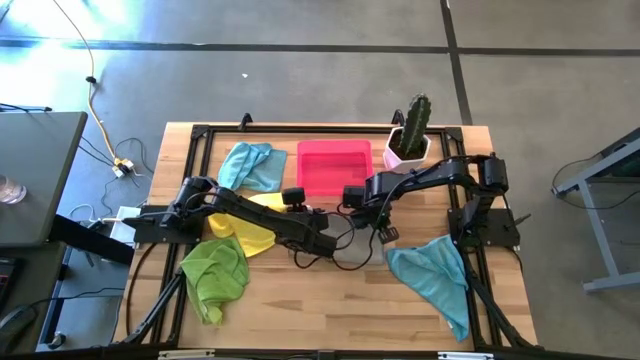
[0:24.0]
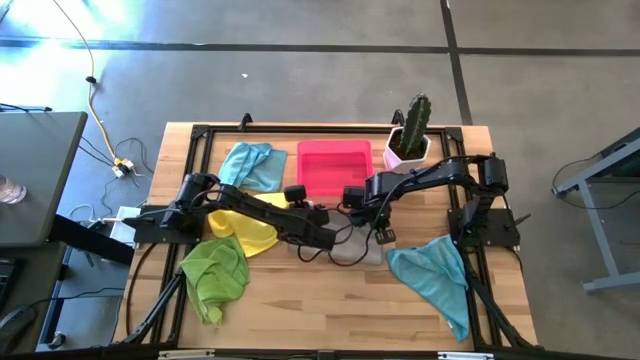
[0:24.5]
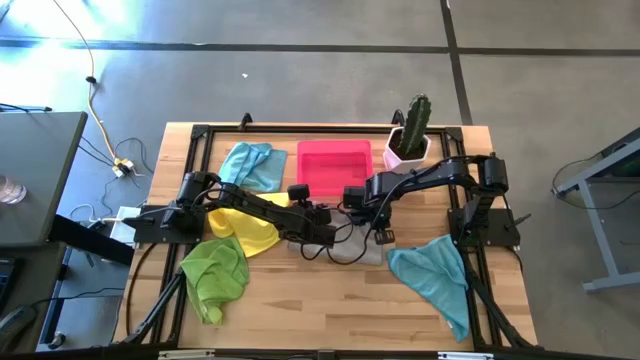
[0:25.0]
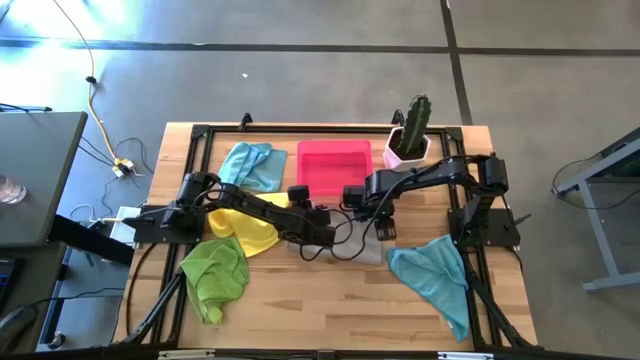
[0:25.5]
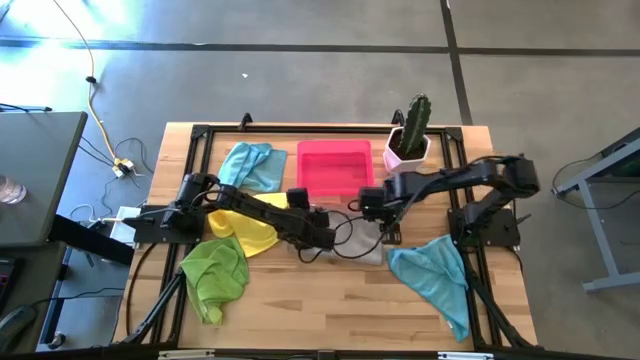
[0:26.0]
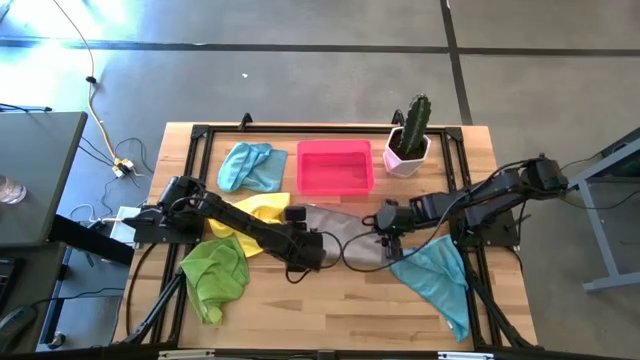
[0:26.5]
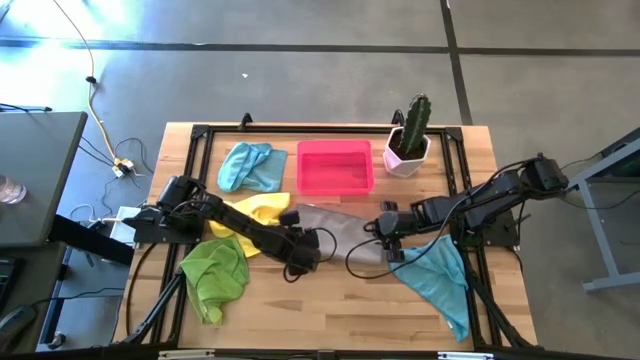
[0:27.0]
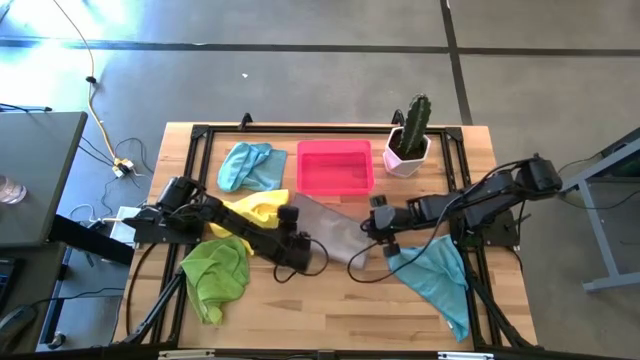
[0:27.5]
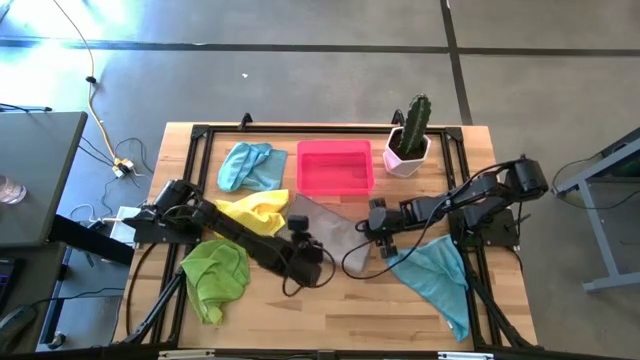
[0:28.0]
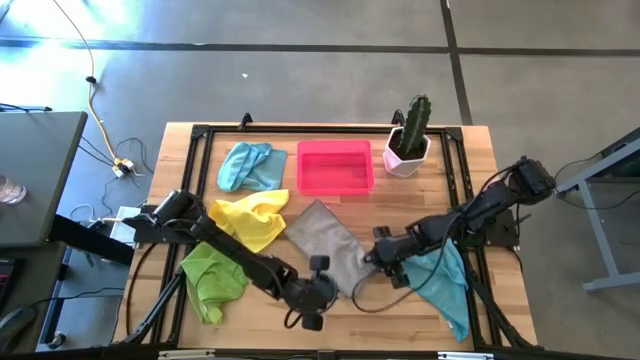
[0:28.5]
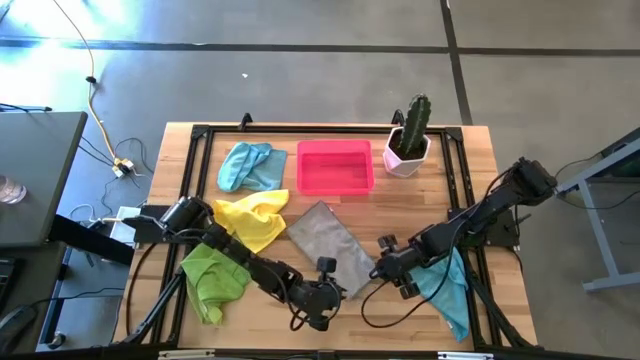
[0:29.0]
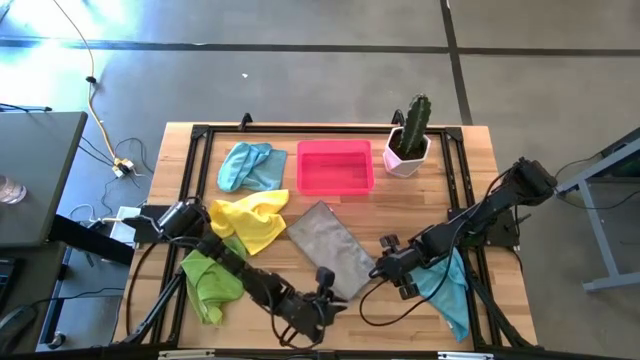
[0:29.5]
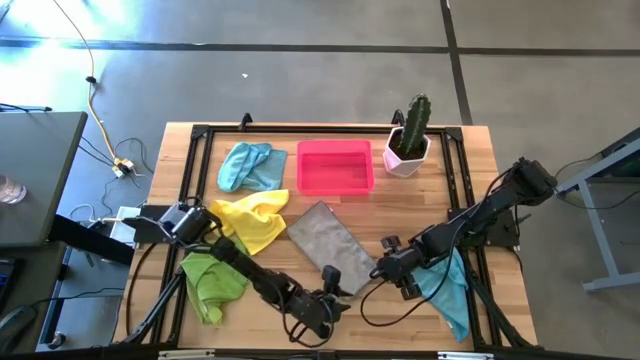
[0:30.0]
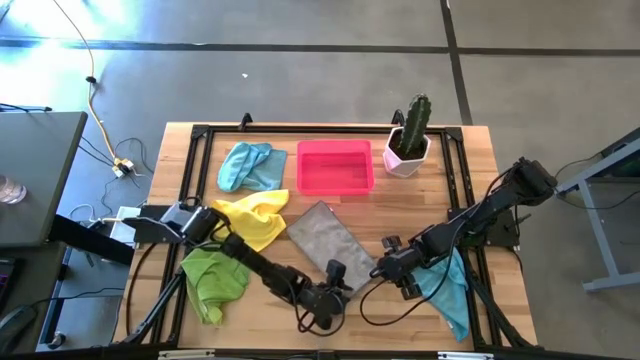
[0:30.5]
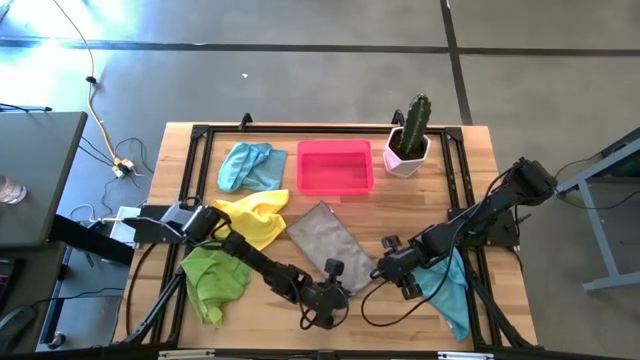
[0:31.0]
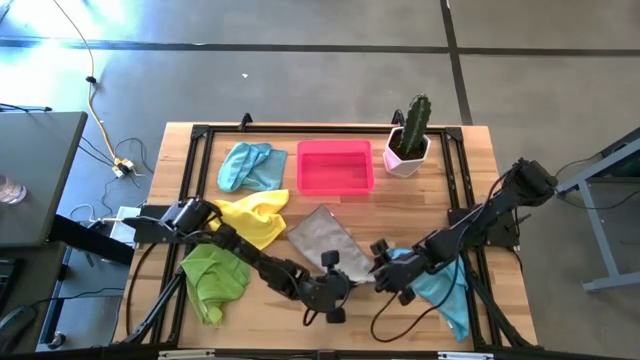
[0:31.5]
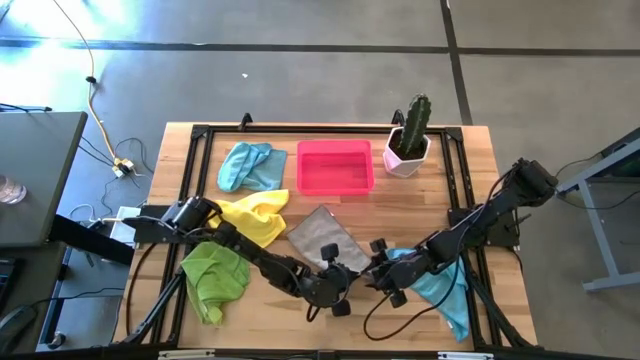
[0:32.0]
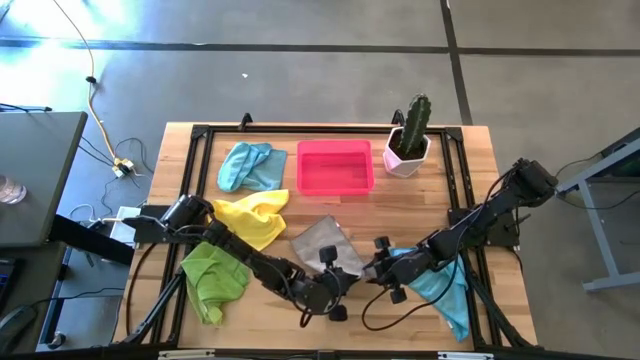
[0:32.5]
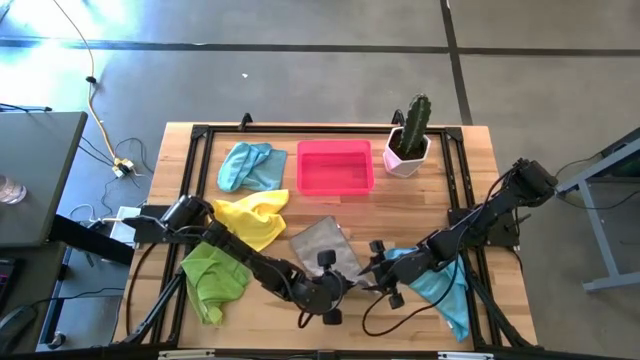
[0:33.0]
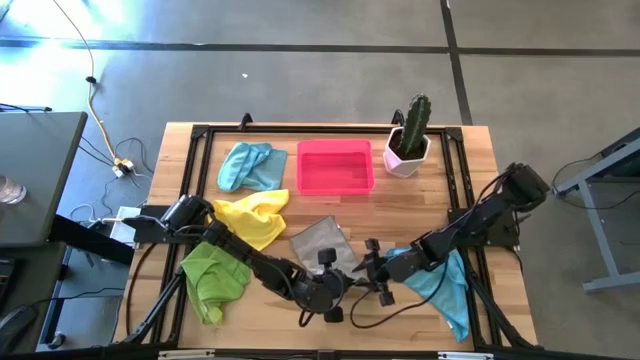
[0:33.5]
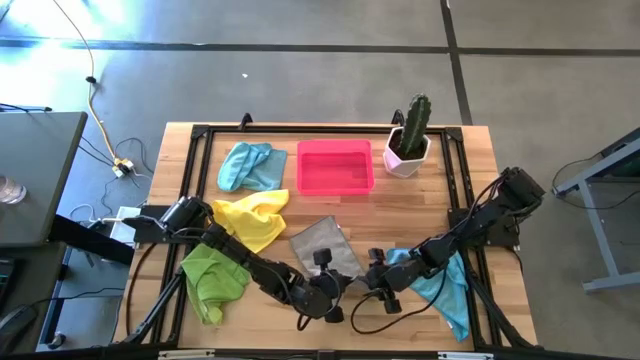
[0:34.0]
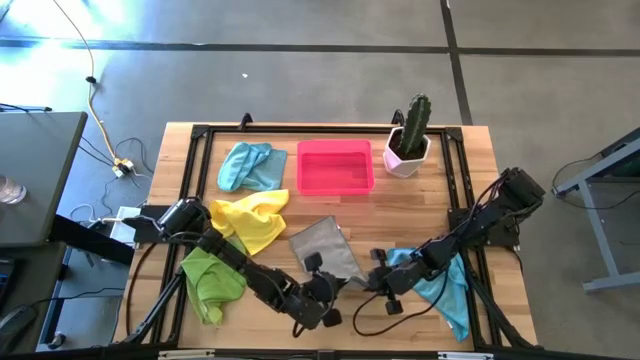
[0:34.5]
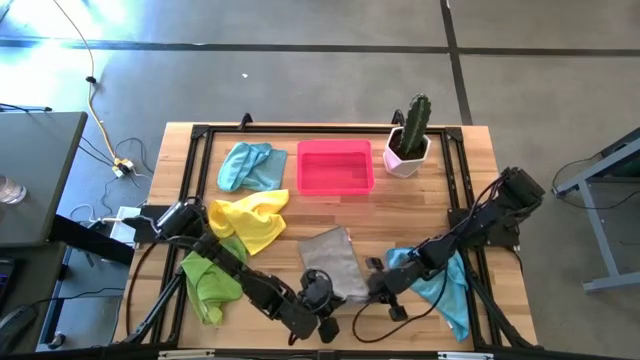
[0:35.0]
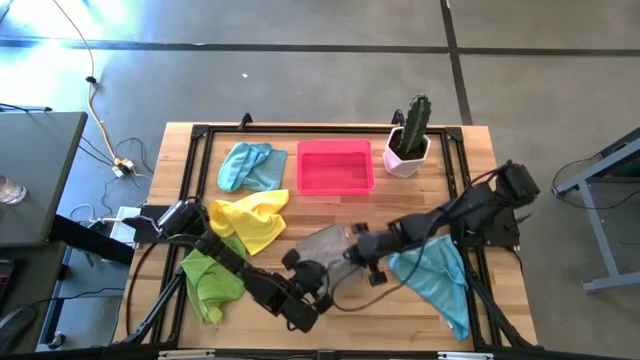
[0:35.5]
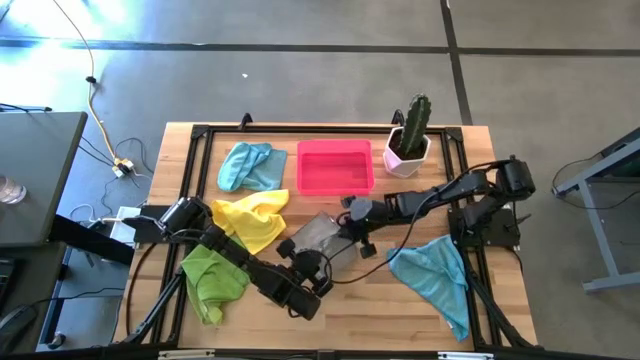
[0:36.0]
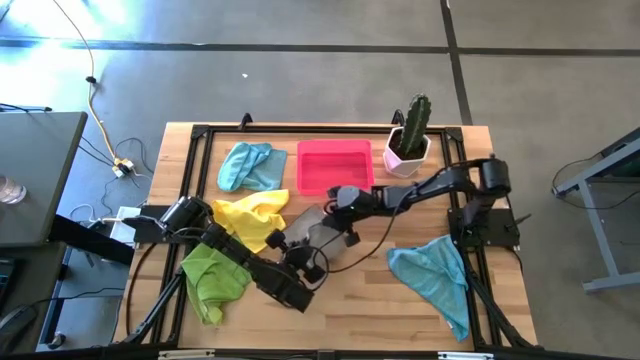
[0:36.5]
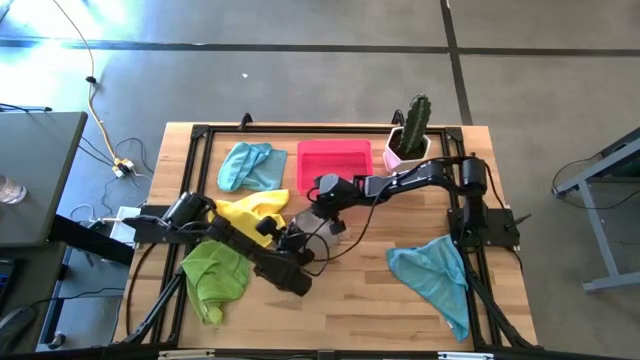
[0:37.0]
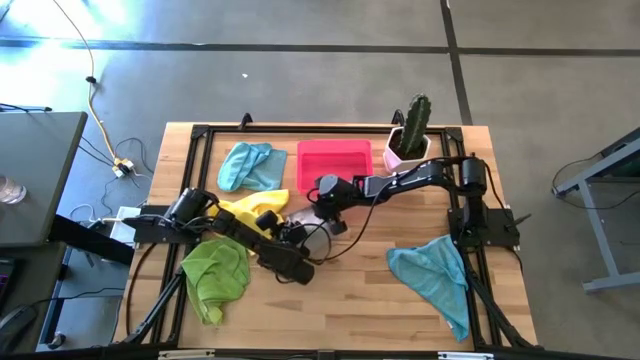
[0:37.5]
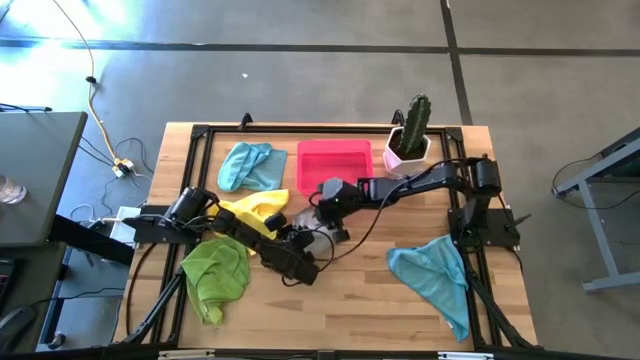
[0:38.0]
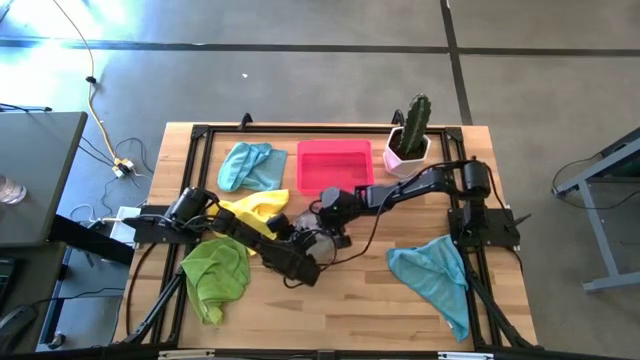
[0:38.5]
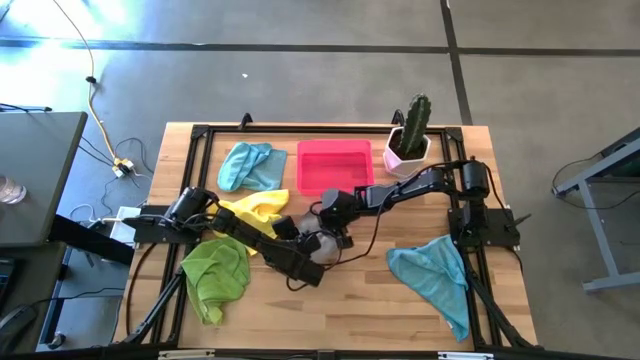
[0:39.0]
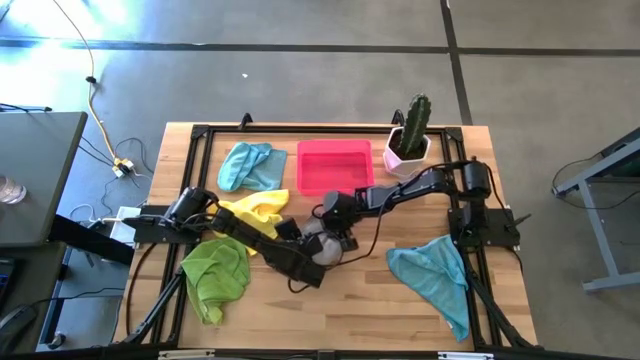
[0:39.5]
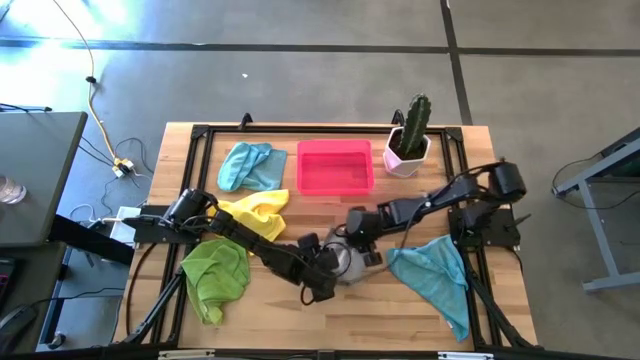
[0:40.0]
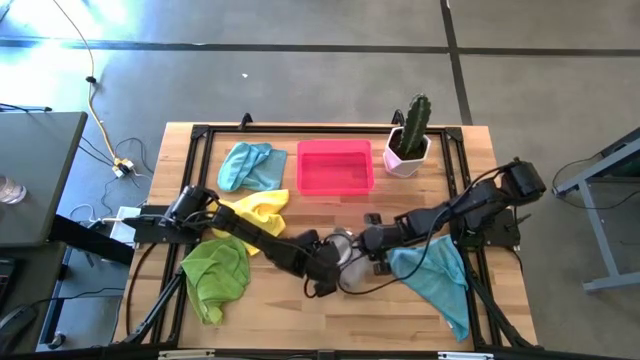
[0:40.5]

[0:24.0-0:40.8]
Task: Fold microfiber towels
Fold the gray microfiber cloth
